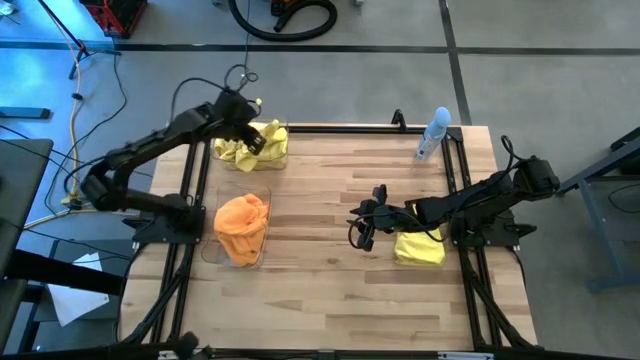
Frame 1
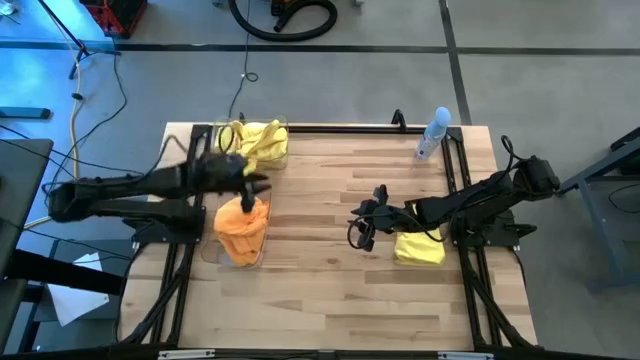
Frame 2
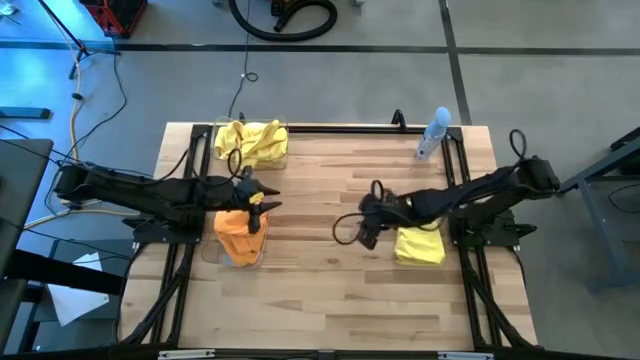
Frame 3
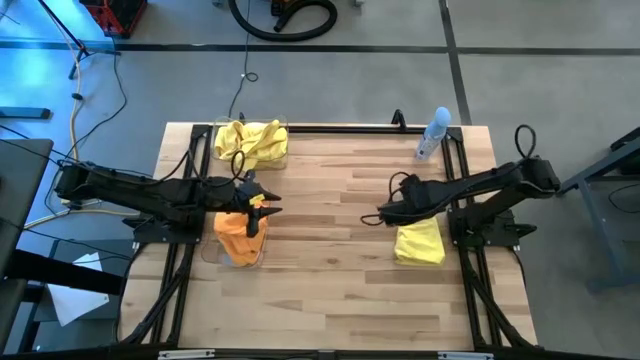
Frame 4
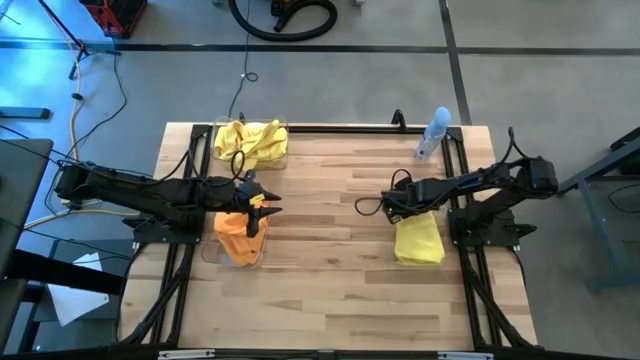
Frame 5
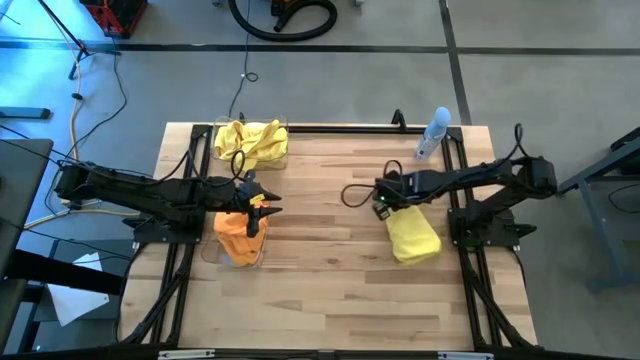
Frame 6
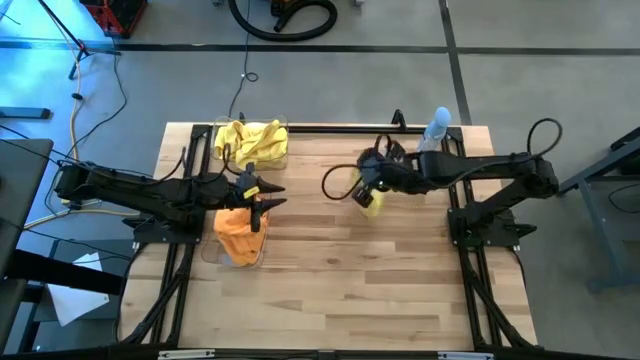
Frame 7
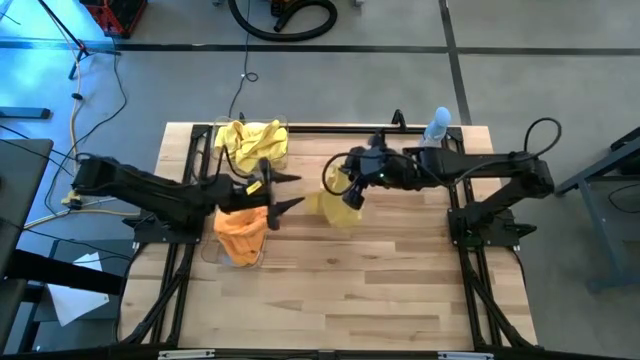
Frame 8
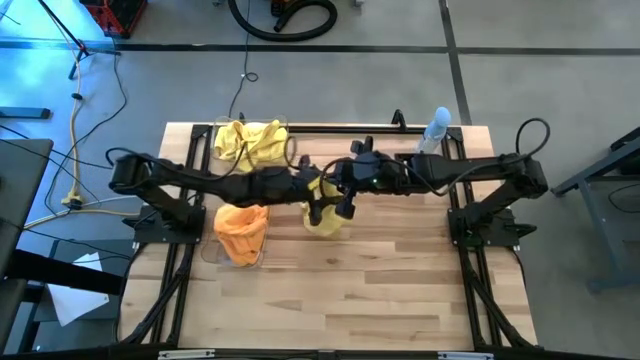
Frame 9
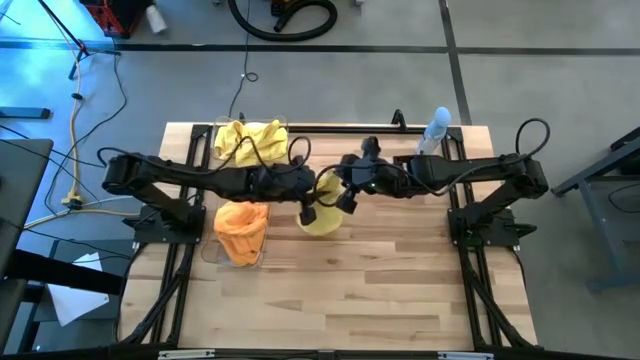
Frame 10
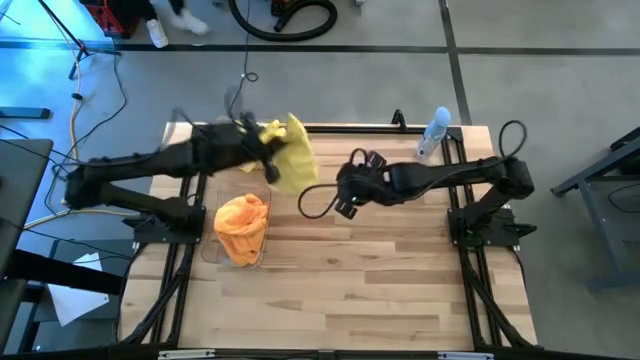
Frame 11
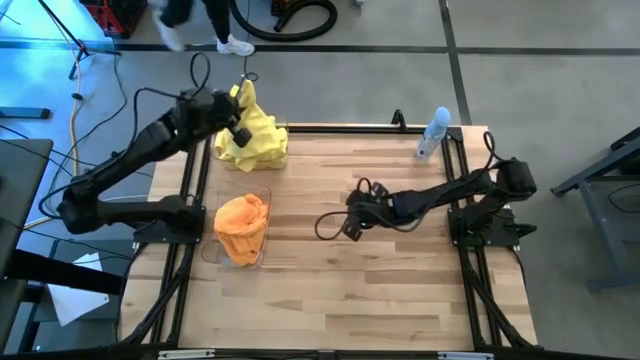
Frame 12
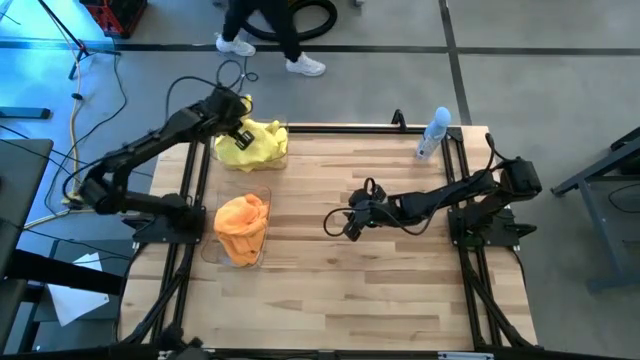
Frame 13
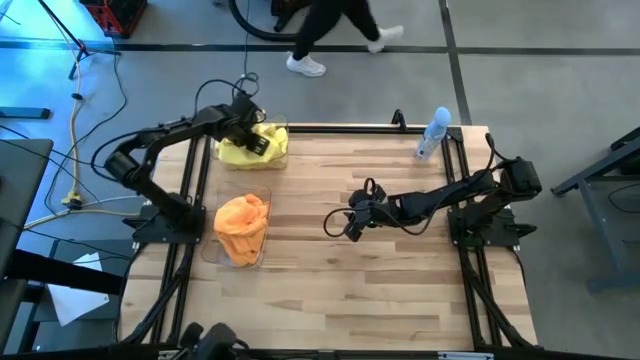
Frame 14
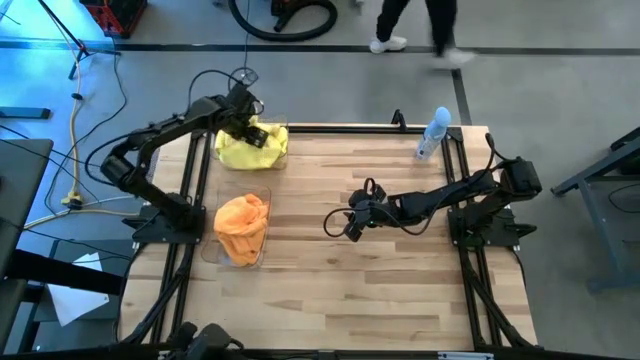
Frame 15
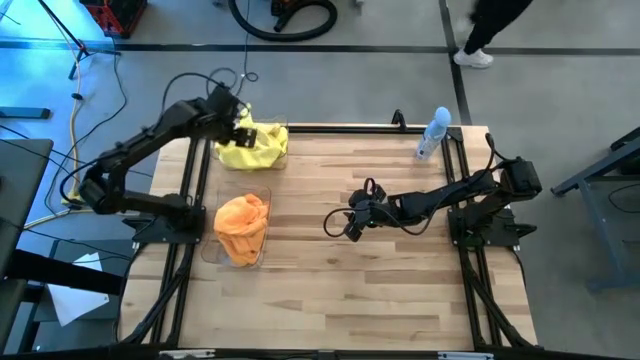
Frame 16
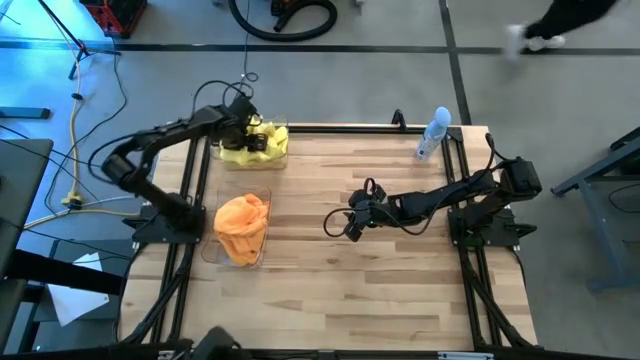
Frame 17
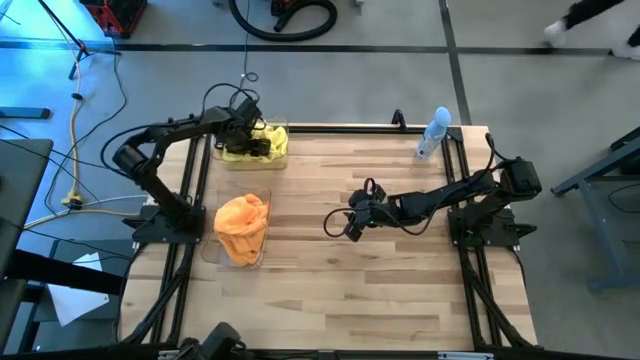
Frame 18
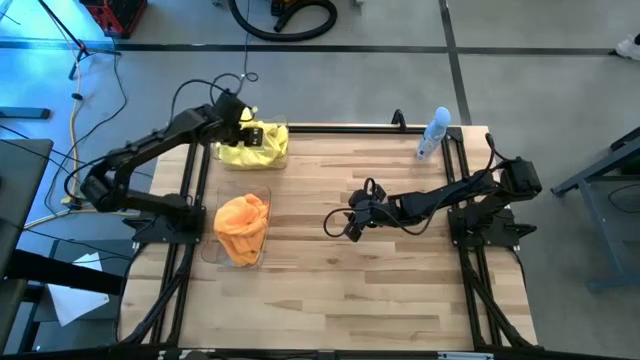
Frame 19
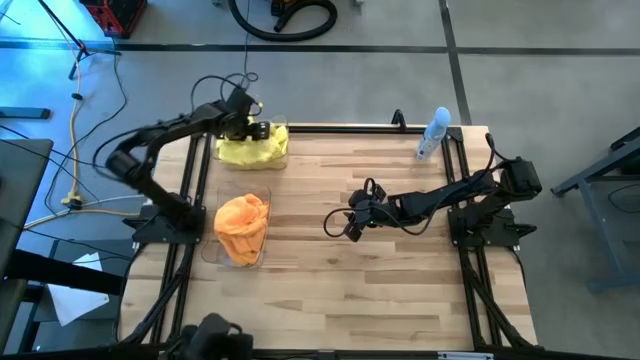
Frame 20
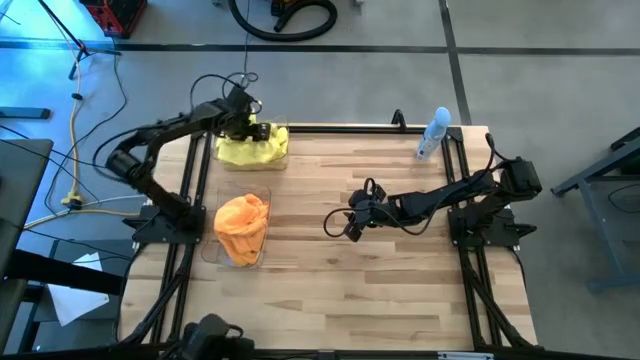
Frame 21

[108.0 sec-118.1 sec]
Task: Sort microfiber towel by color & place in baskets
Put the yellow microfiber towel into the top transparent bin

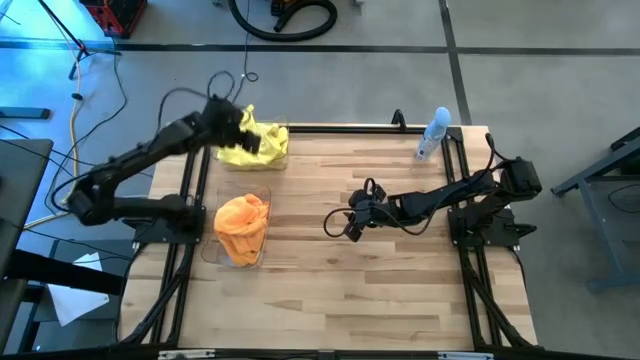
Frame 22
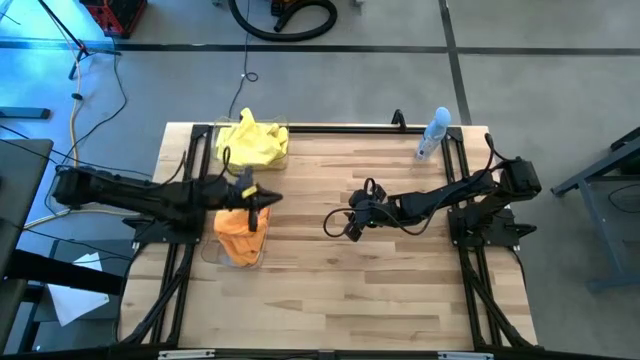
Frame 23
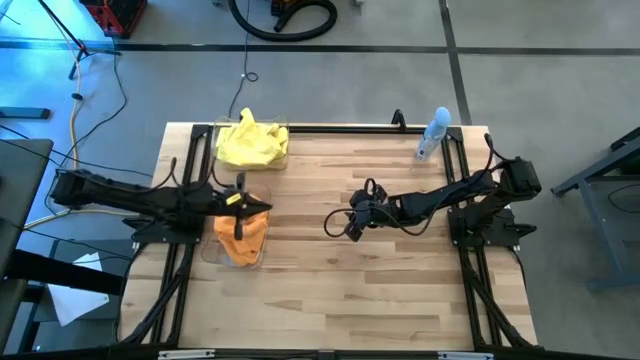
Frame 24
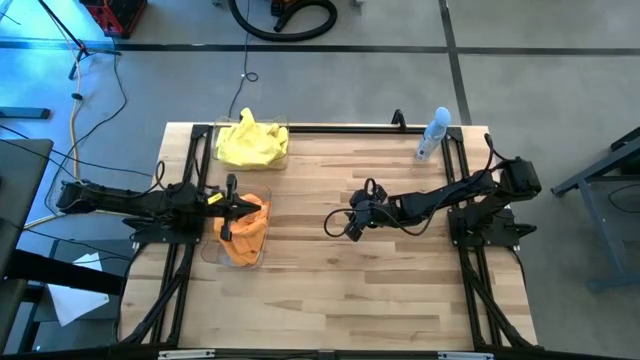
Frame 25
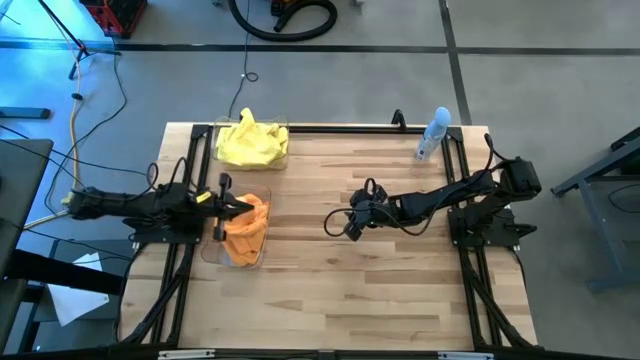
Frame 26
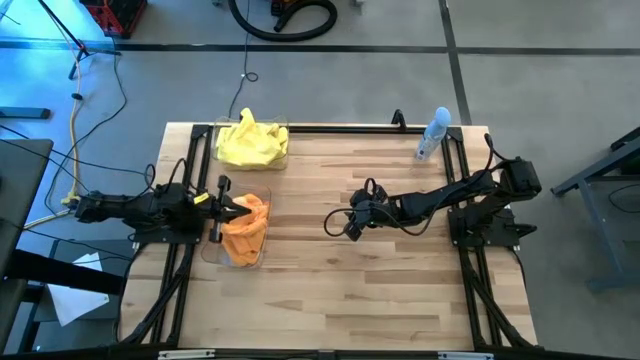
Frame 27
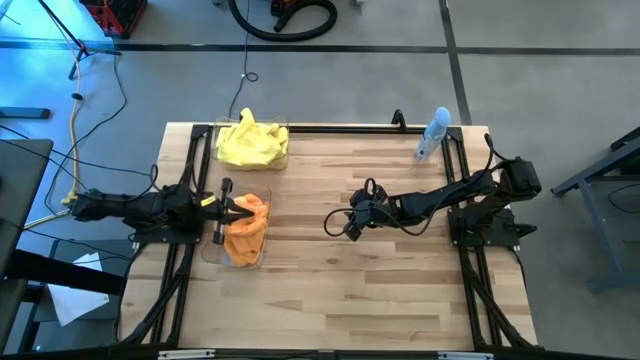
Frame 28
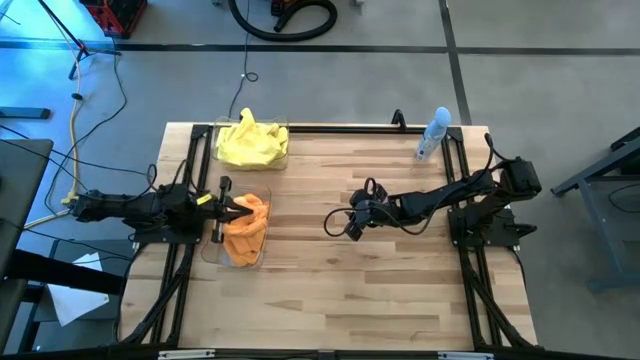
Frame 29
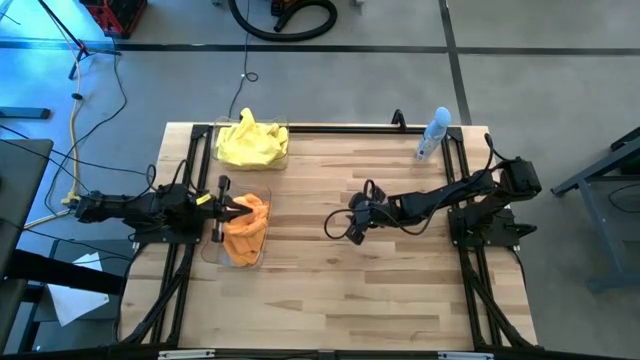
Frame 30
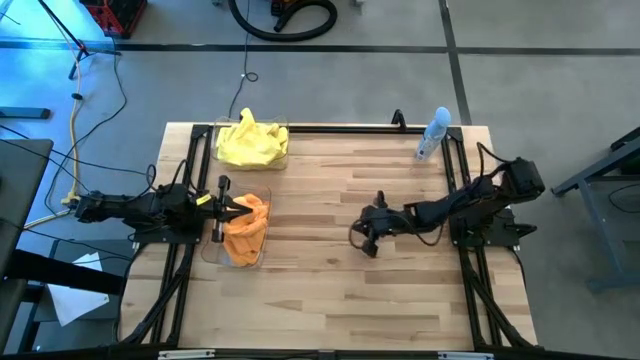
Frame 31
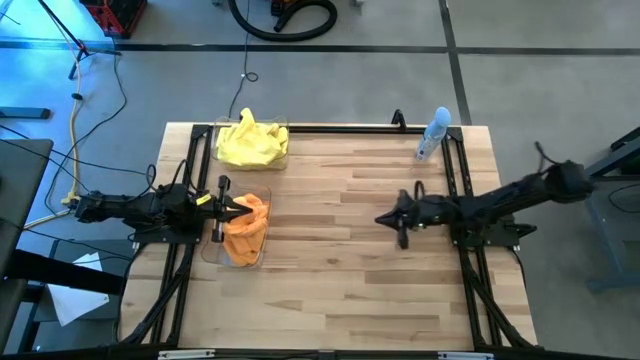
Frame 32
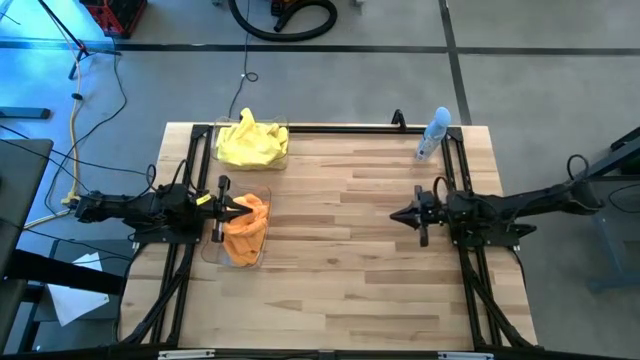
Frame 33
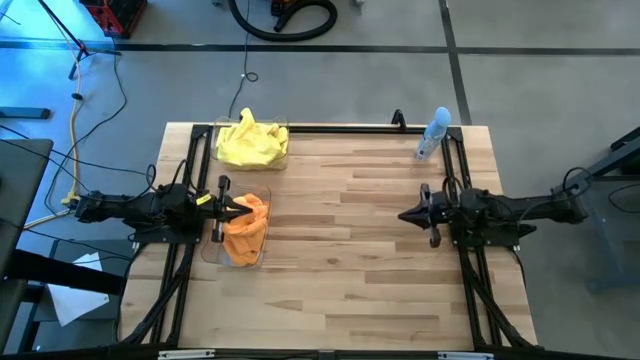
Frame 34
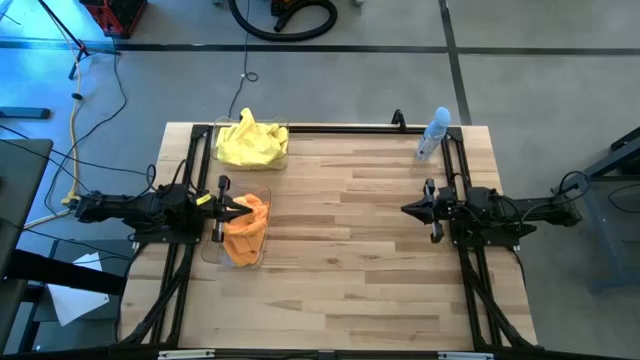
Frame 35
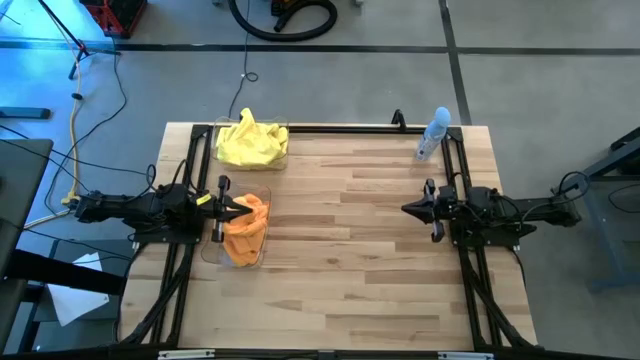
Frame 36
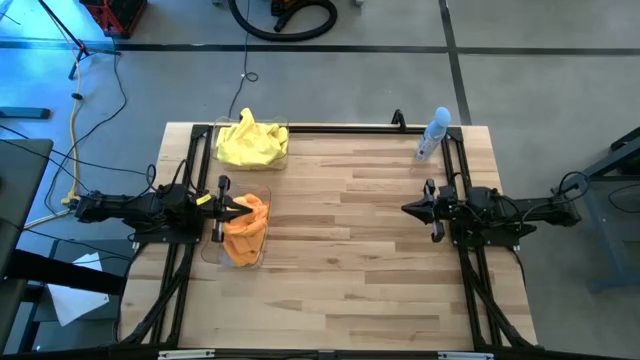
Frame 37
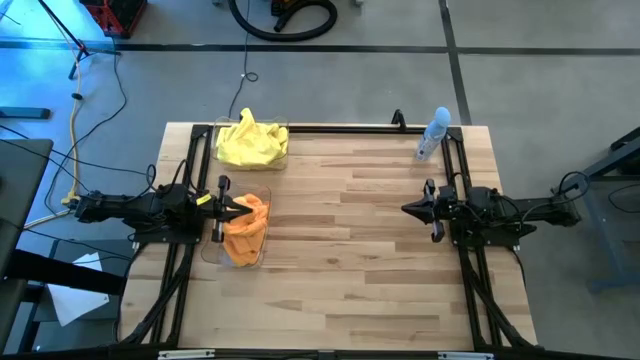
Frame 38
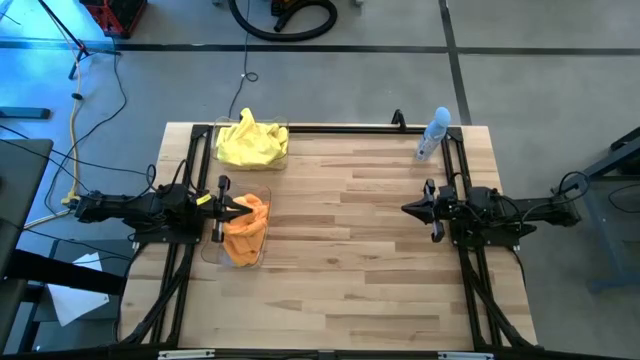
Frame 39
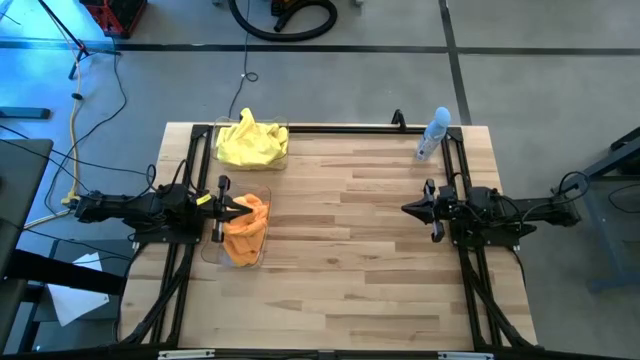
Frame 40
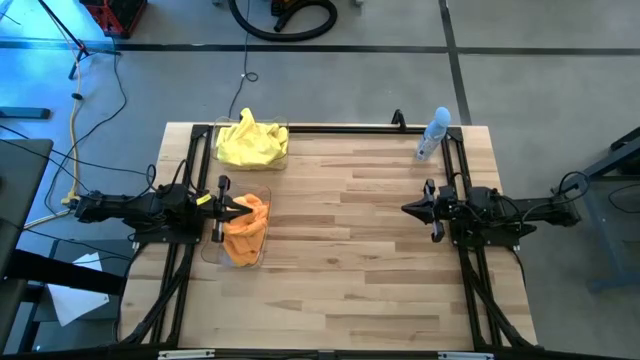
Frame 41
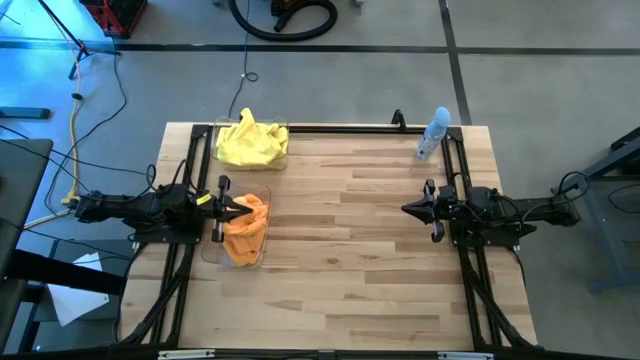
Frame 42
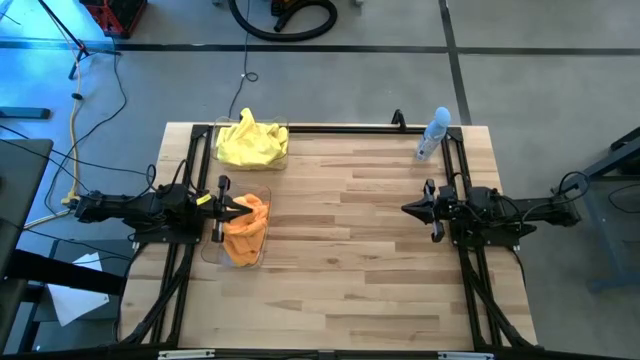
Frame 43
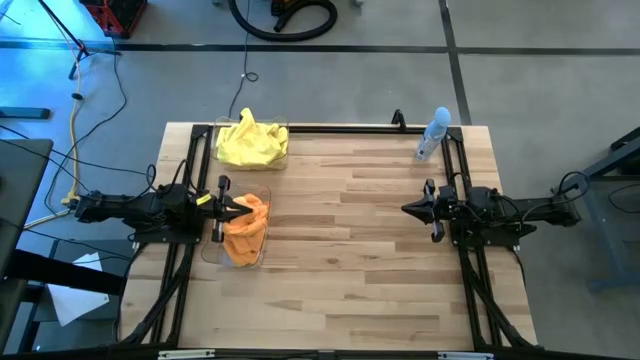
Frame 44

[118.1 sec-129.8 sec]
Return to Home Position
